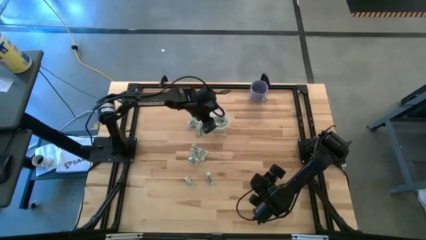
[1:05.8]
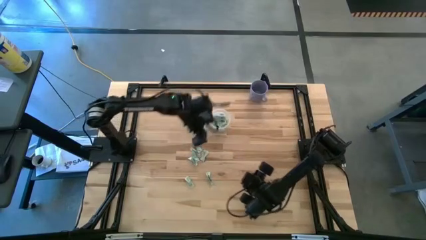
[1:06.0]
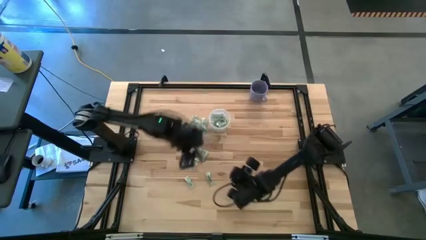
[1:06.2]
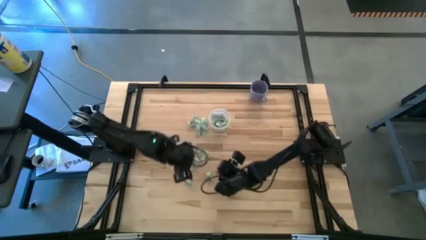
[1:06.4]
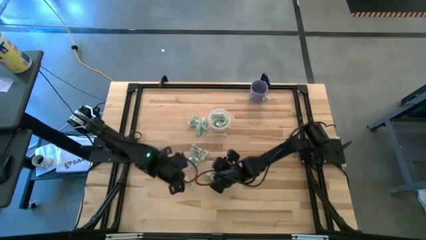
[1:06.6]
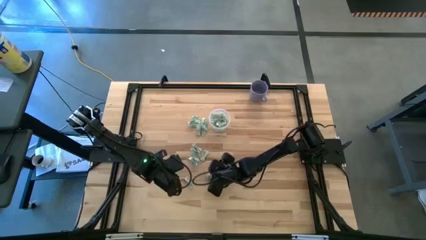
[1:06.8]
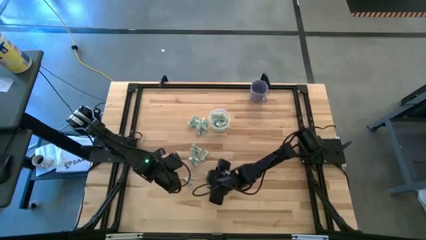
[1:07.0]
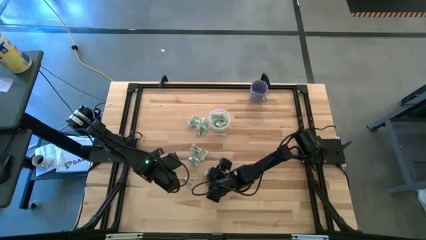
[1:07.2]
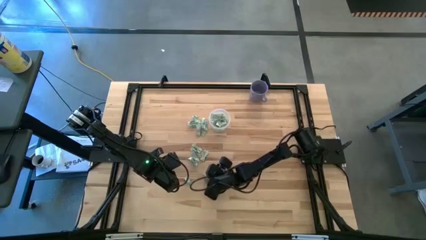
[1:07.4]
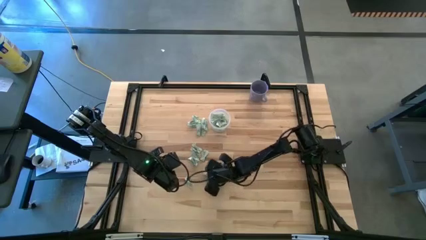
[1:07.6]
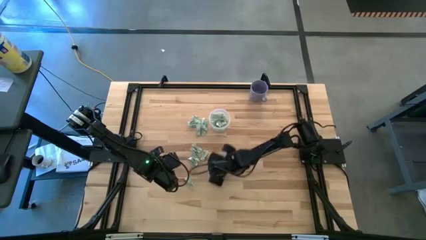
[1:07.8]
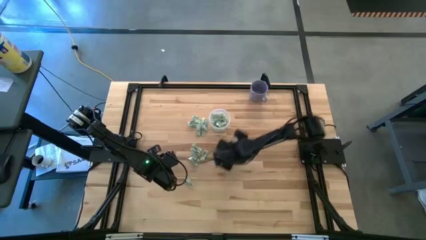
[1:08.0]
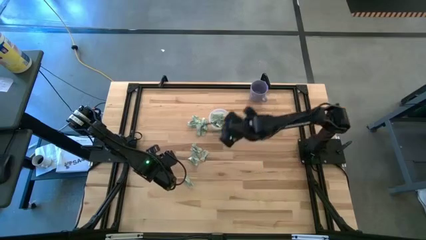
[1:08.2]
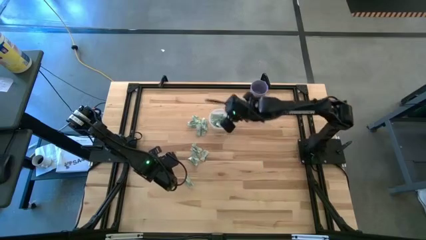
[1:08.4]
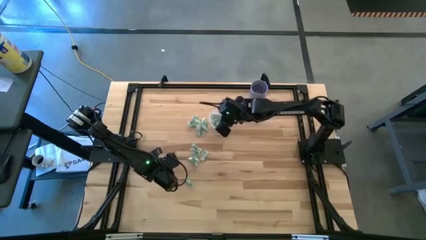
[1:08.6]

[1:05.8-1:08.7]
Task: Pick and place Stevia / Truvia into bins
Put the stevia packet into the transparent container

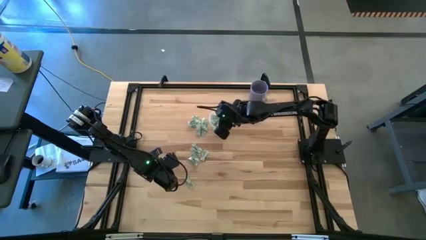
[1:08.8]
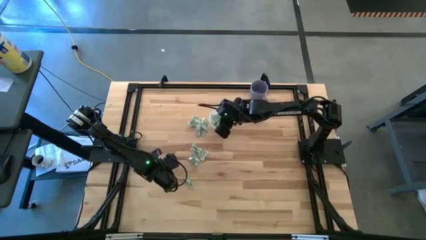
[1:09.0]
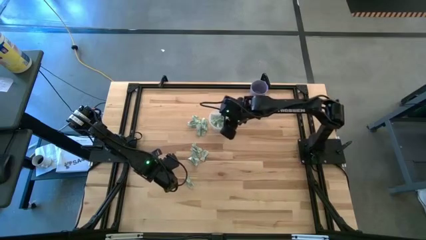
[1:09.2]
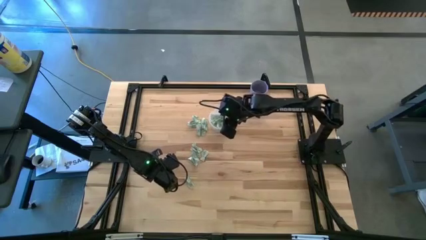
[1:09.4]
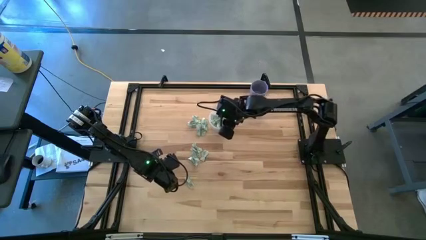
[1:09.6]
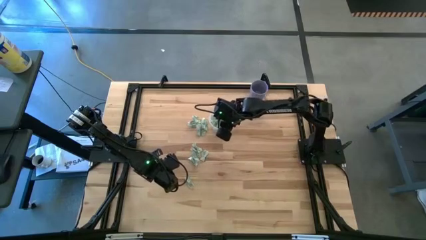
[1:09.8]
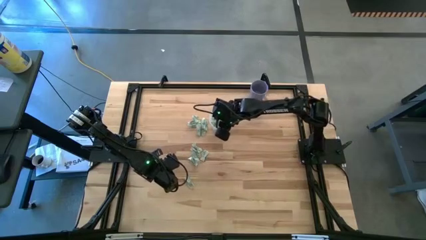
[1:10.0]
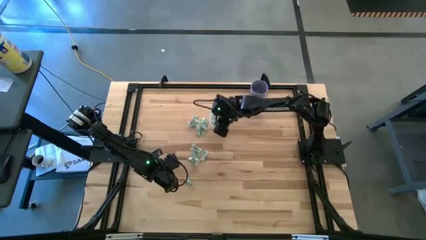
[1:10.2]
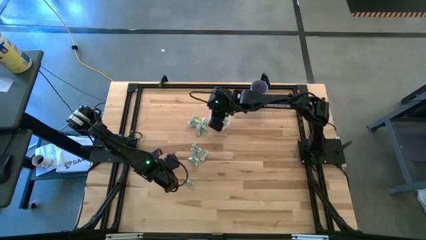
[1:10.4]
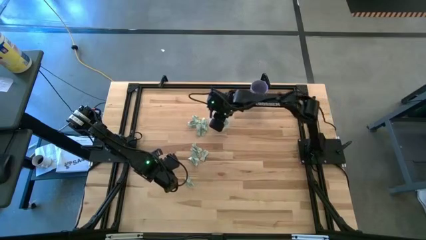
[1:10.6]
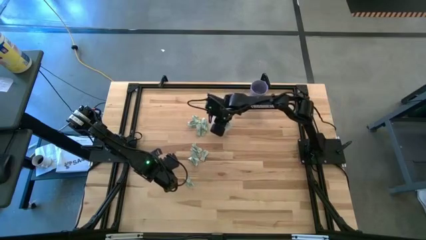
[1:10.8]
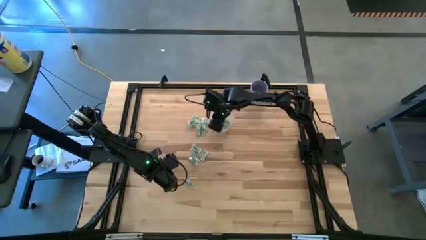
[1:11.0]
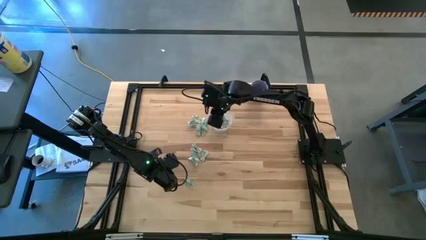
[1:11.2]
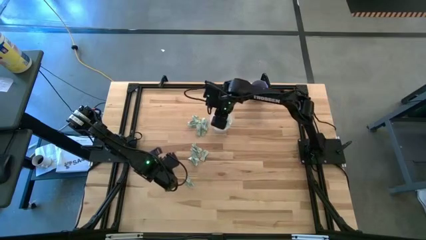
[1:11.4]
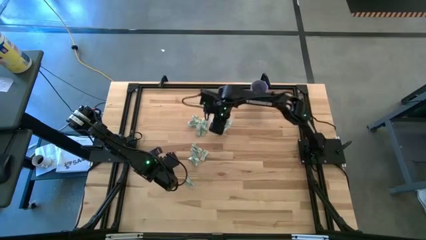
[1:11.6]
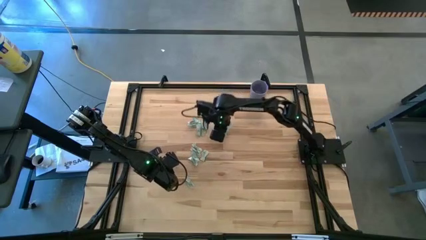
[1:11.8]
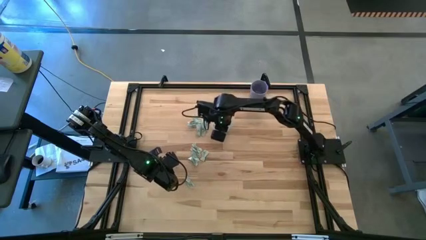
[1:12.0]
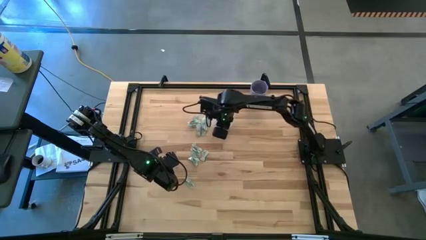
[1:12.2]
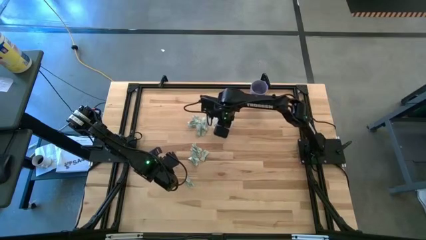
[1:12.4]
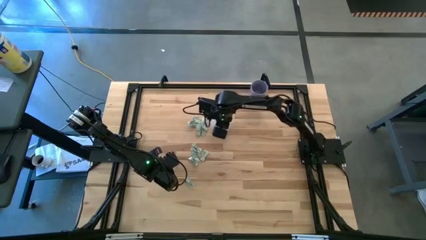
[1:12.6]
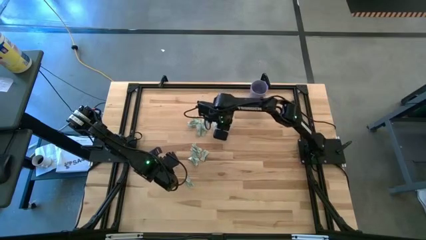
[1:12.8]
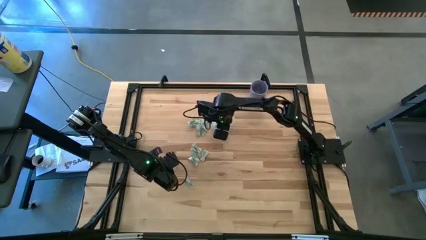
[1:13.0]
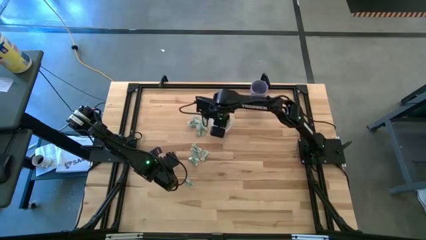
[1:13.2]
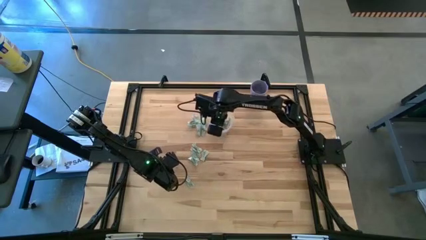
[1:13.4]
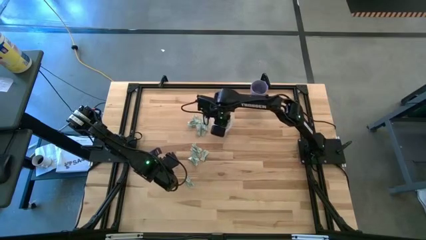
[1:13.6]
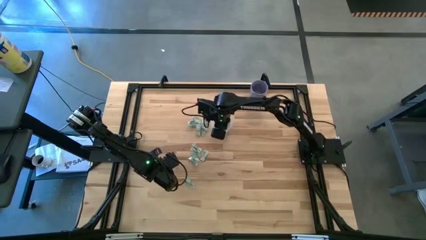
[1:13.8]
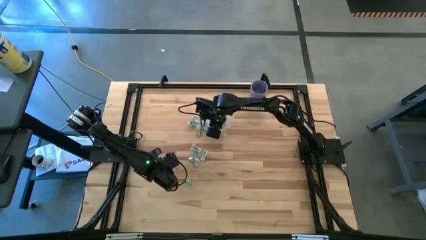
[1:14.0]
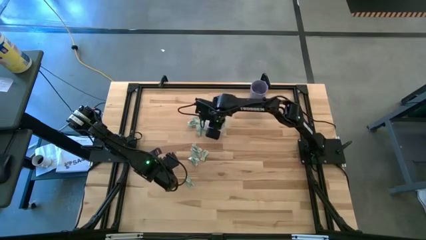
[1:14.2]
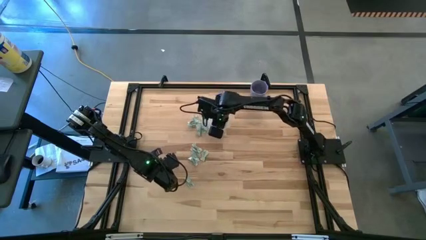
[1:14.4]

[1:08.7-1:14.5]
Adjust the stevia packets in the transparent container

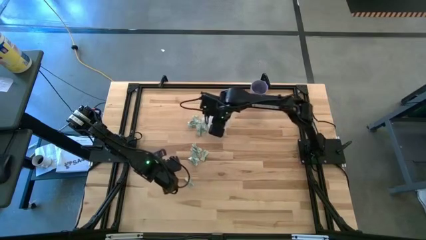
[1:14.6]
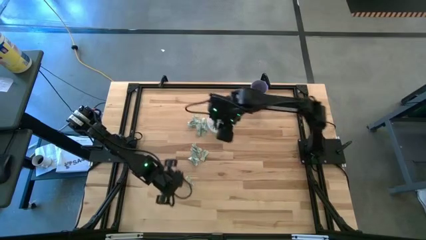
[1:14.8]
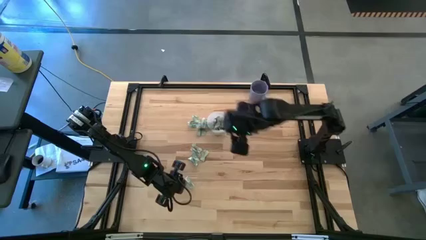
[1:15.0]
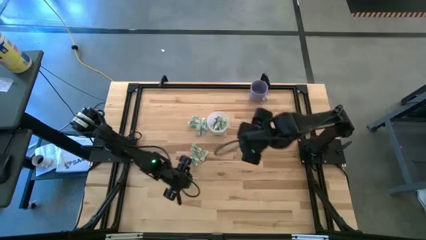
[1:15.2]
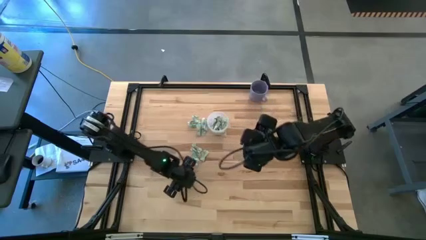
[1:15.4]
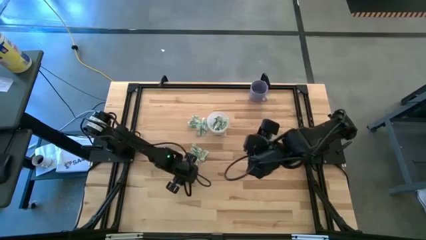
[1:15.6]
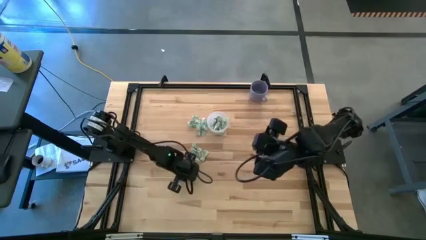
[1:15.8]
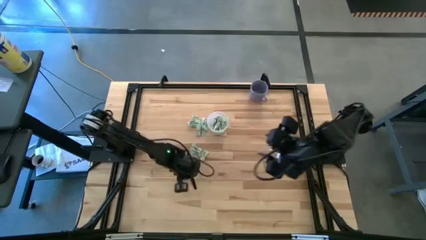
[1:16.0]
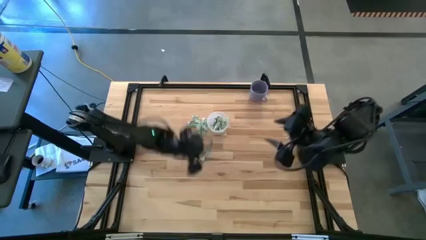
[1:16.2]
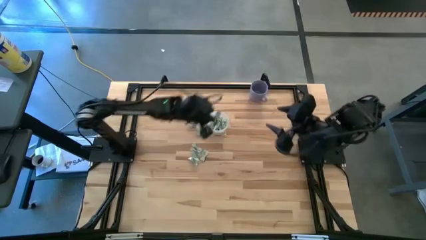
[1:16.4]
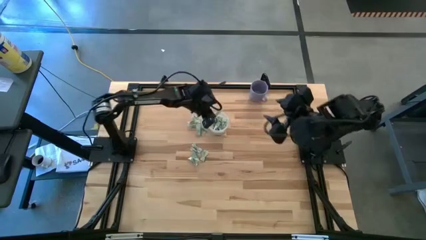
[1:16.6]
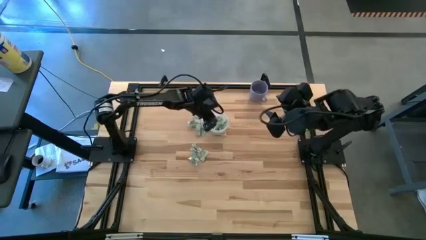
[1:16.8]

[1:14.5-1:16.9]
Put the stevia packet into the transparent container

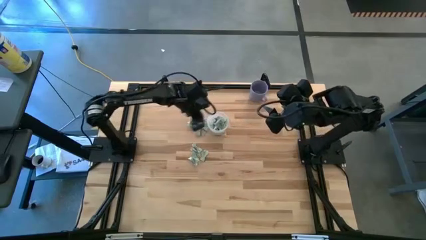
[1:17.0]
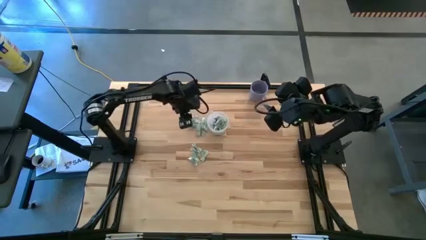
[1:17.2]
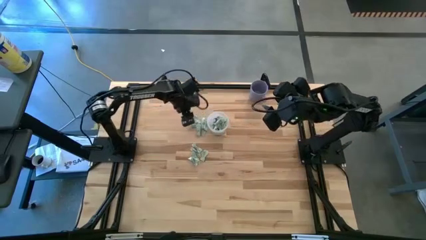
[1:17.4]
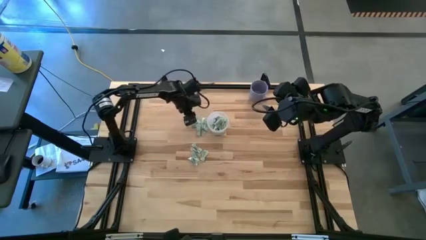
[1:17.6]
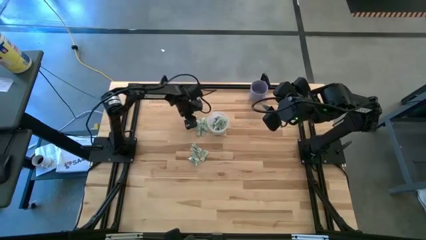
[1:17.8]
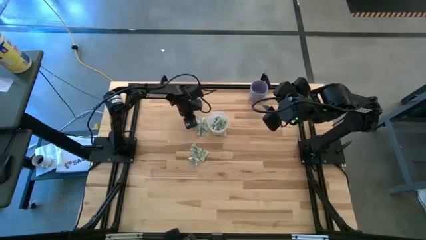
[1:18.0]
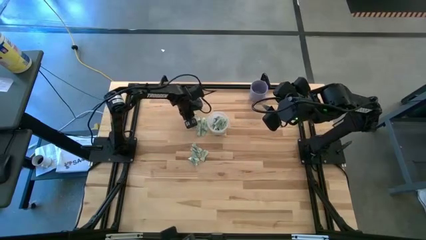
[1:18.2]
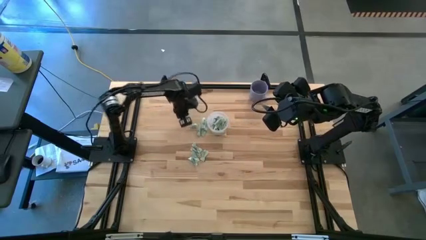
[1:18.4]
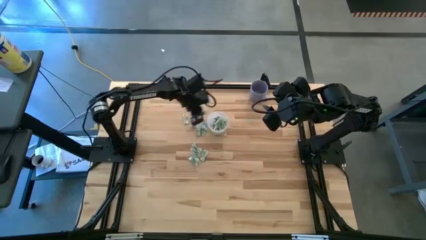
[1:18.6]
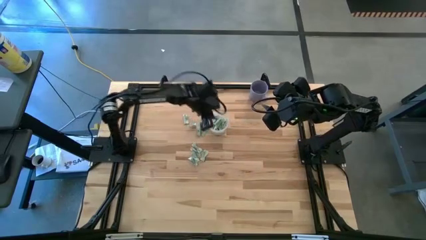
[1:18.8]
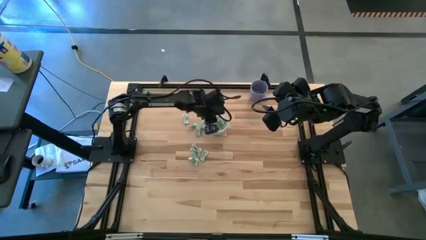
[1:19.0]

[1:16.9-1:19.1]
Put the stevia packet into the transparent container

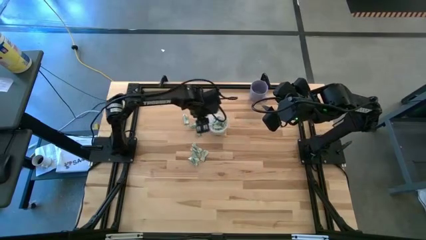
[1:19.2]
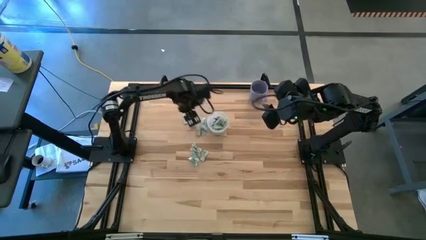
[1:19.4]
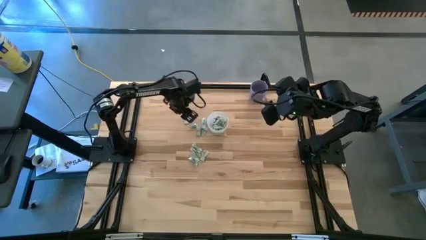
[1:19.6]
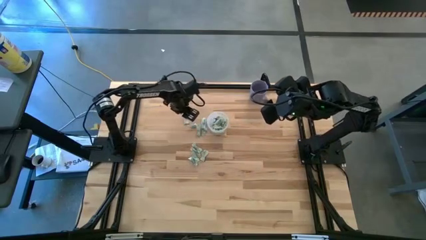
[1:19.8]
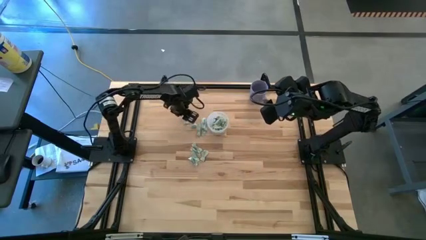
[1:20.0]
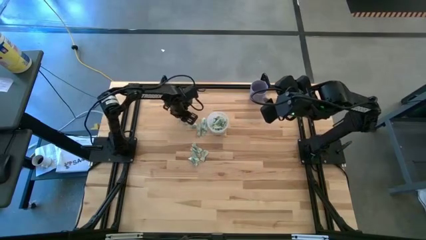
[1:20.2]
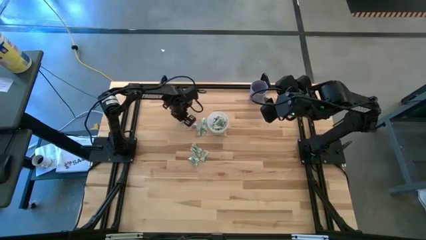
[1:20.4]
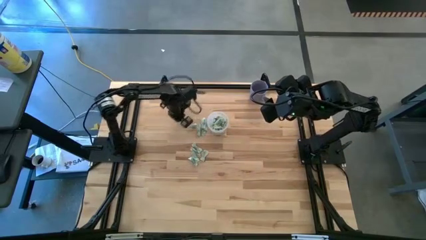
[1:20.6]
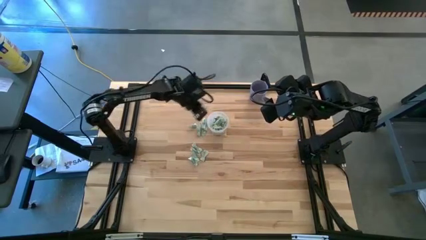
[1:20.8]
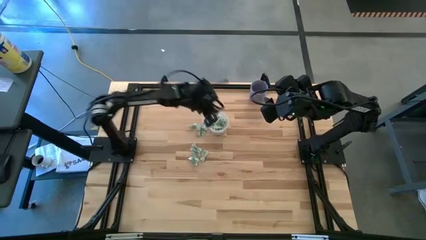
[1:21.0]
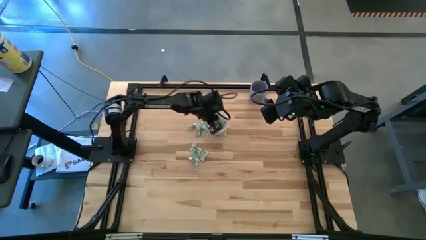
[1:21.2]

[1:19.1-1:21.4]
Put the stevia packet into the transparent container

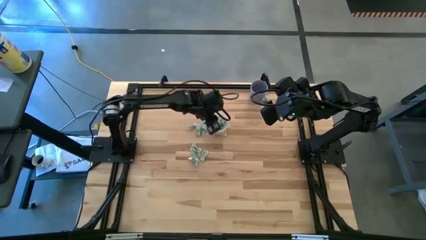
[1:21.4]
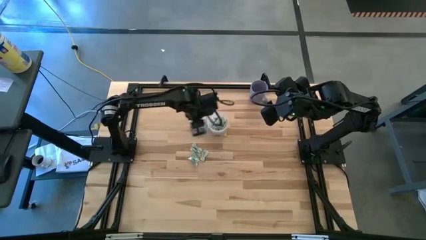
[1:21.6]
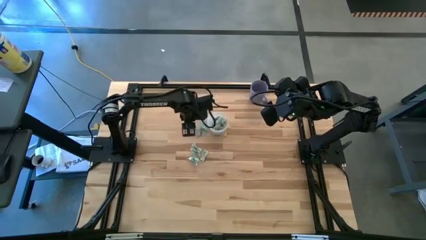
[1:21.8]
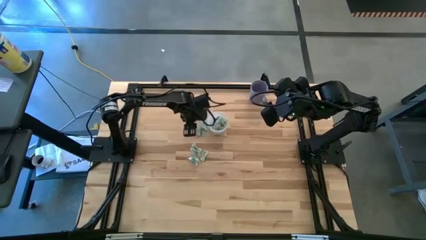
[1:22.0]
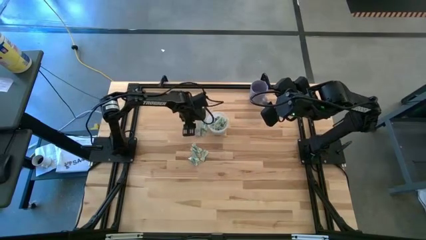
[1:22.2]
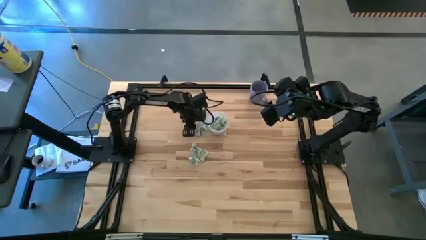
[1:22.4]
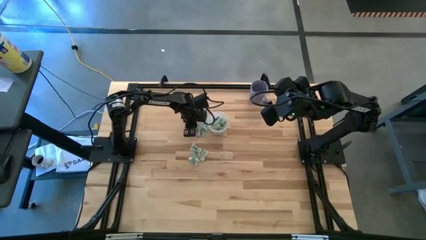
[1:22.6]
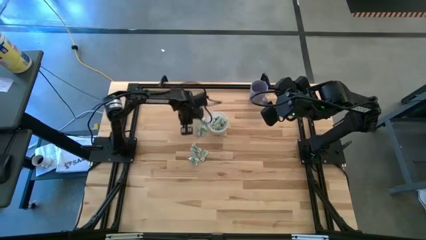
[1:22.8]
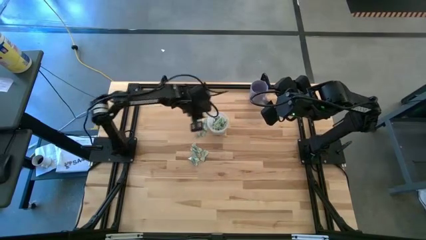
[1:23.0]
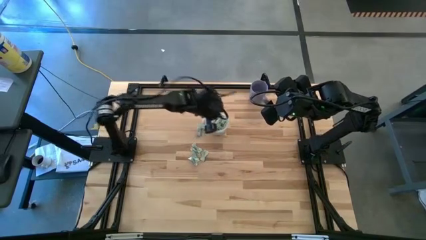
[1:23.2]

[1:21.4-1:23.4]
Put the stevia packet into the transparent container
